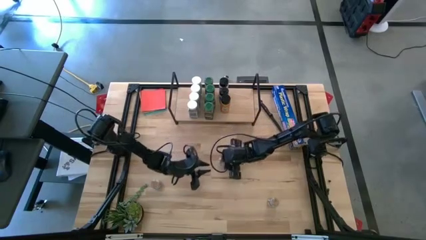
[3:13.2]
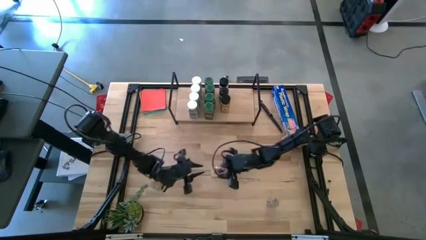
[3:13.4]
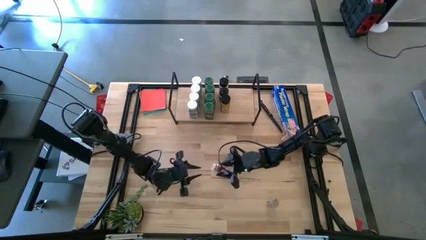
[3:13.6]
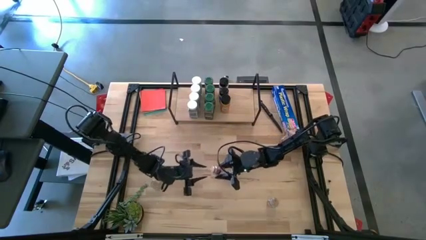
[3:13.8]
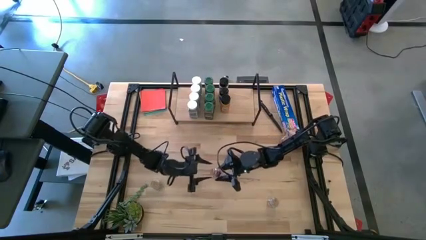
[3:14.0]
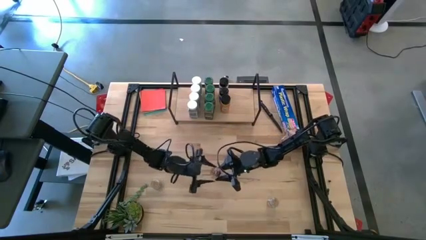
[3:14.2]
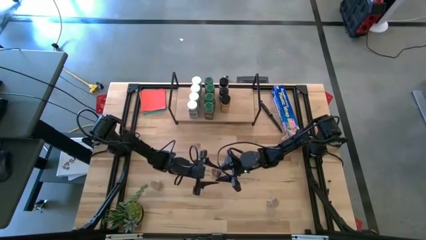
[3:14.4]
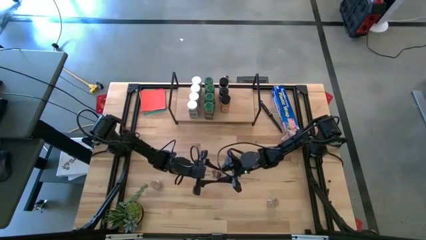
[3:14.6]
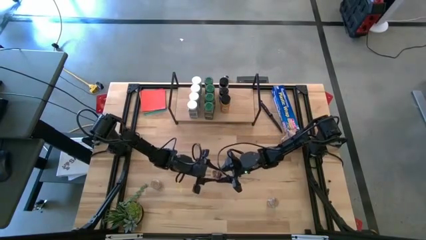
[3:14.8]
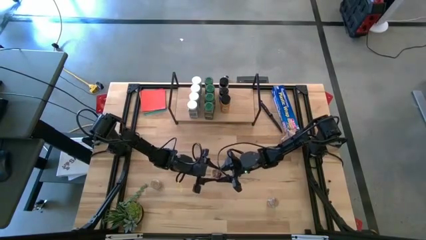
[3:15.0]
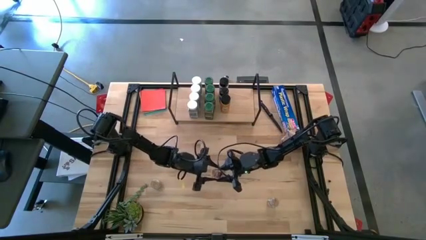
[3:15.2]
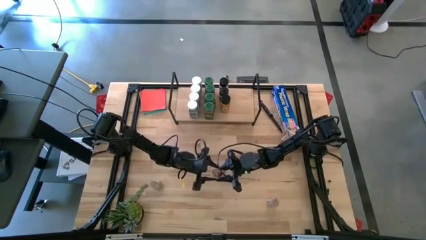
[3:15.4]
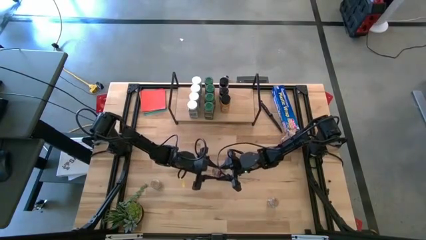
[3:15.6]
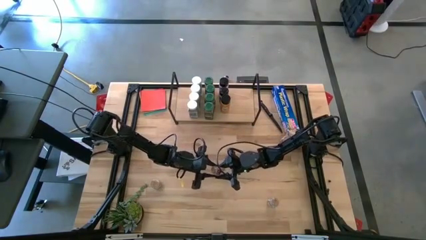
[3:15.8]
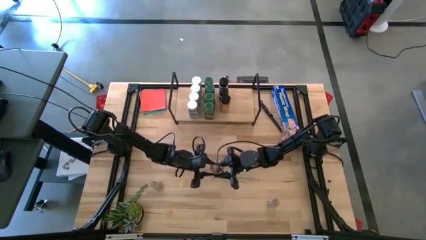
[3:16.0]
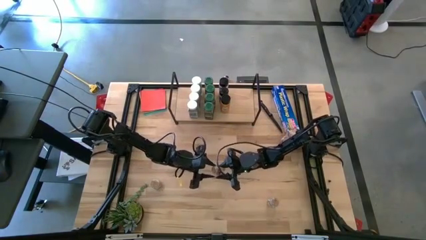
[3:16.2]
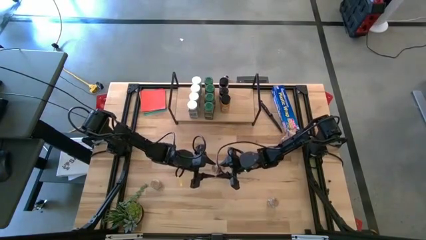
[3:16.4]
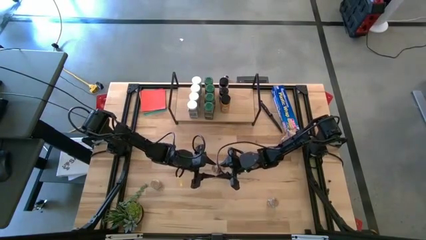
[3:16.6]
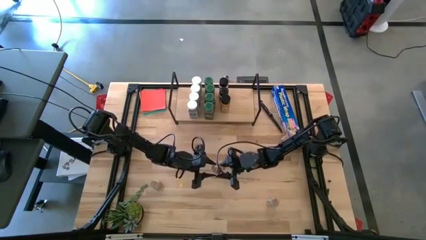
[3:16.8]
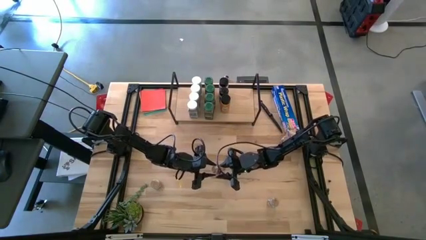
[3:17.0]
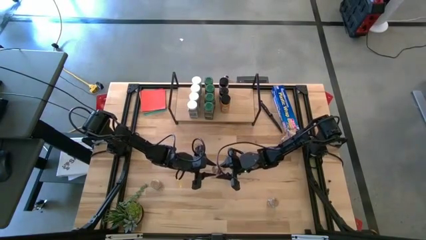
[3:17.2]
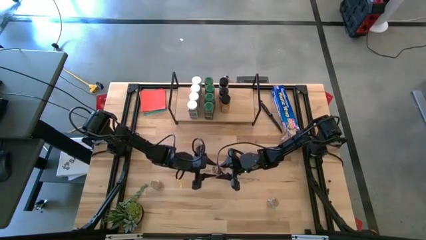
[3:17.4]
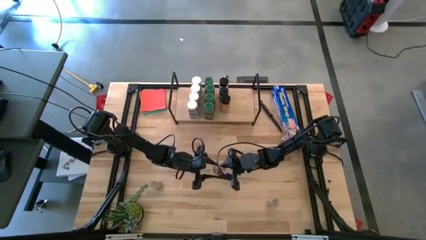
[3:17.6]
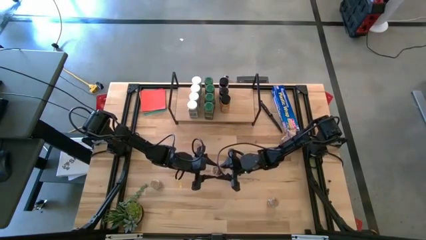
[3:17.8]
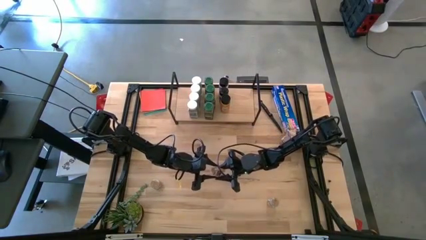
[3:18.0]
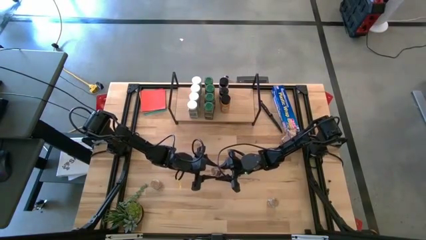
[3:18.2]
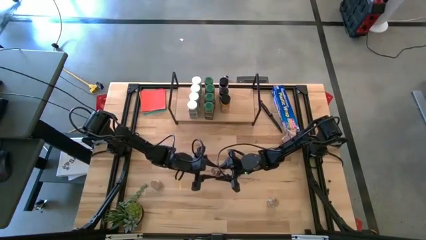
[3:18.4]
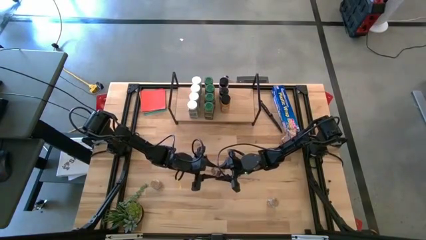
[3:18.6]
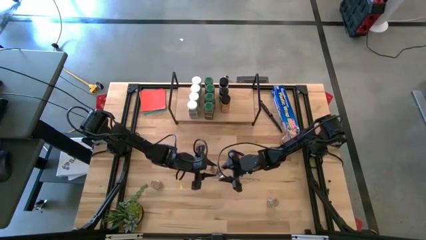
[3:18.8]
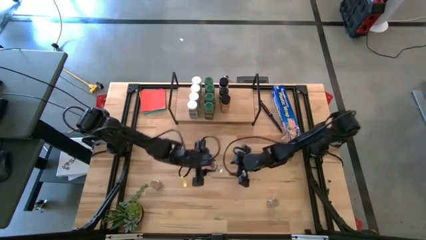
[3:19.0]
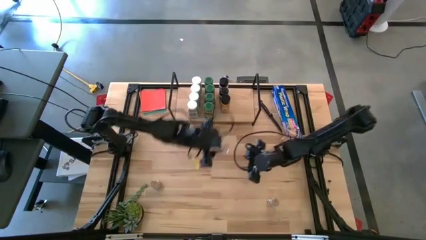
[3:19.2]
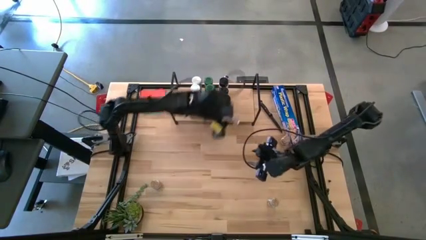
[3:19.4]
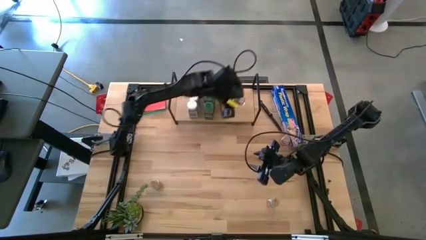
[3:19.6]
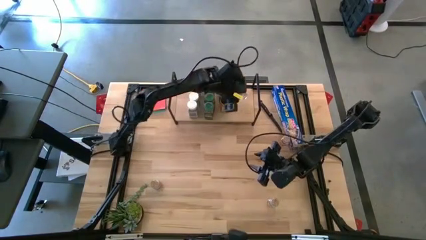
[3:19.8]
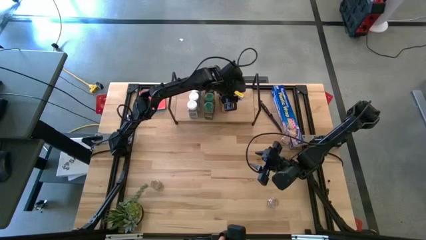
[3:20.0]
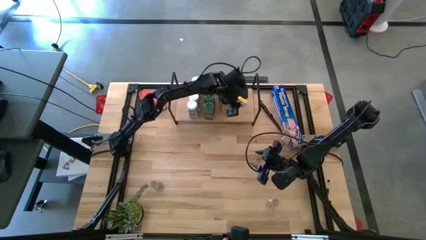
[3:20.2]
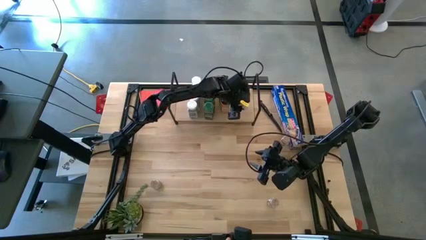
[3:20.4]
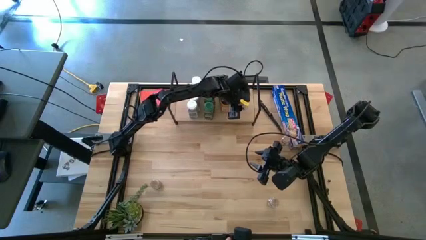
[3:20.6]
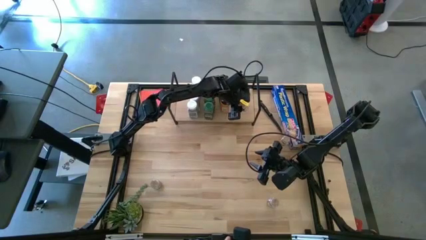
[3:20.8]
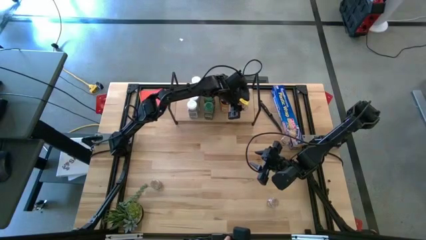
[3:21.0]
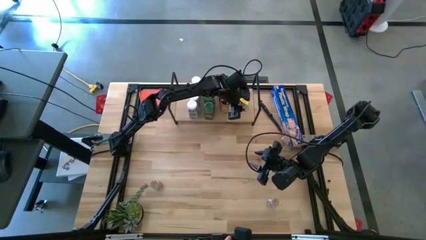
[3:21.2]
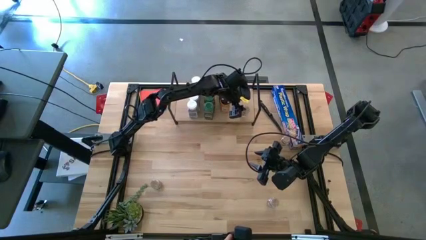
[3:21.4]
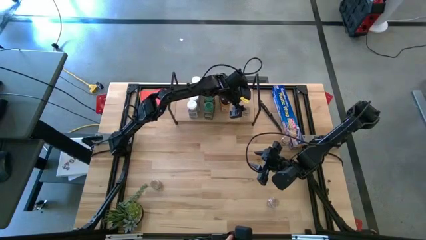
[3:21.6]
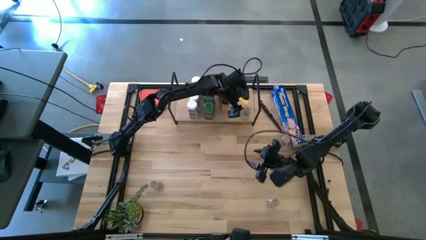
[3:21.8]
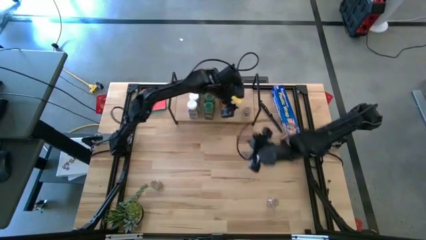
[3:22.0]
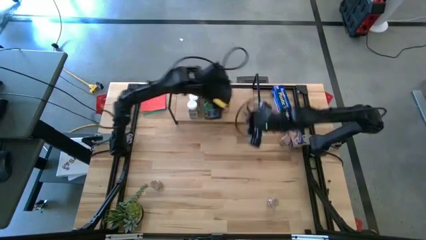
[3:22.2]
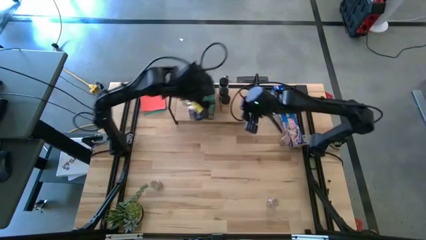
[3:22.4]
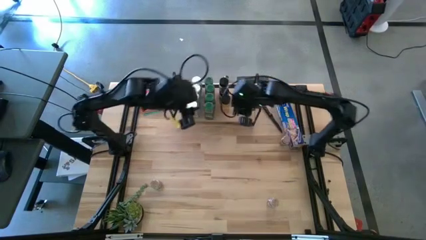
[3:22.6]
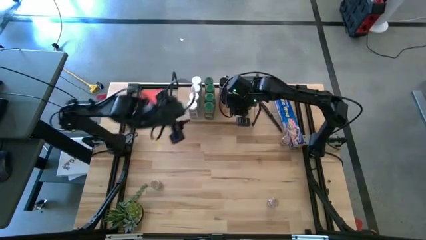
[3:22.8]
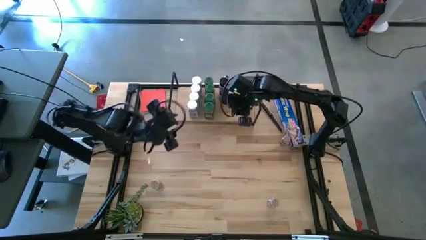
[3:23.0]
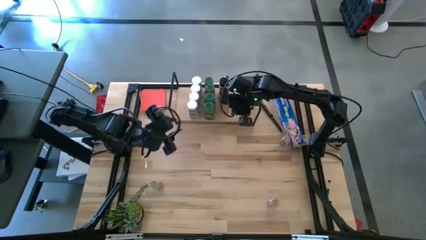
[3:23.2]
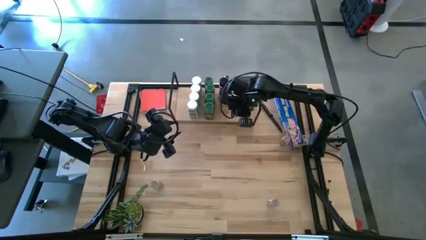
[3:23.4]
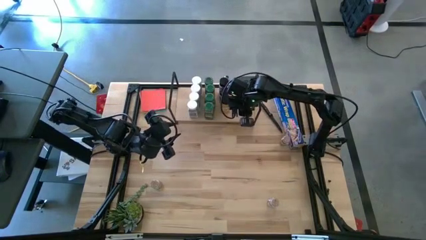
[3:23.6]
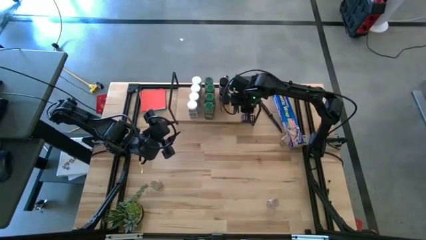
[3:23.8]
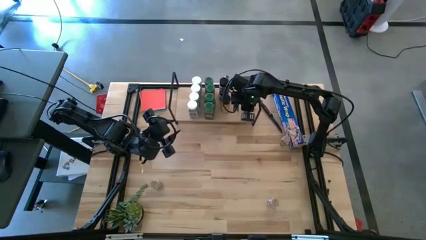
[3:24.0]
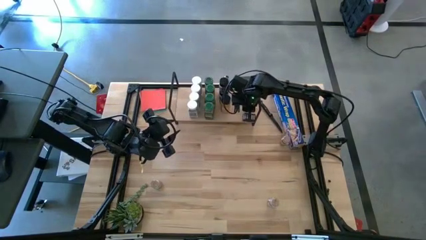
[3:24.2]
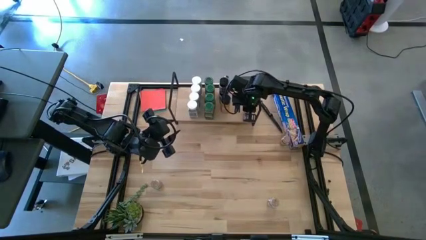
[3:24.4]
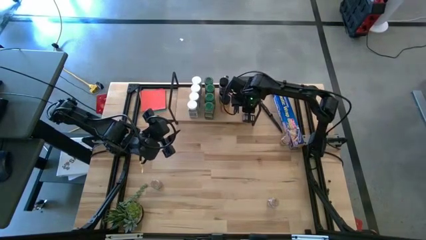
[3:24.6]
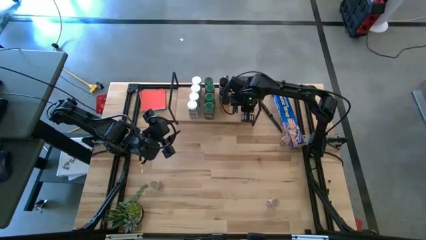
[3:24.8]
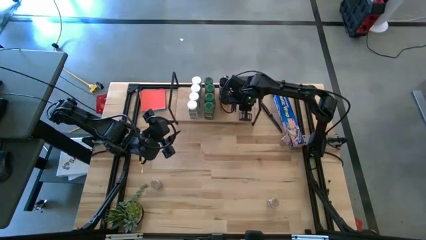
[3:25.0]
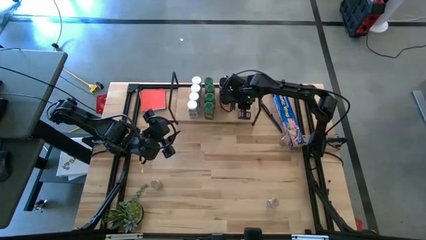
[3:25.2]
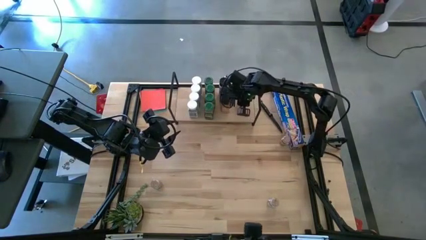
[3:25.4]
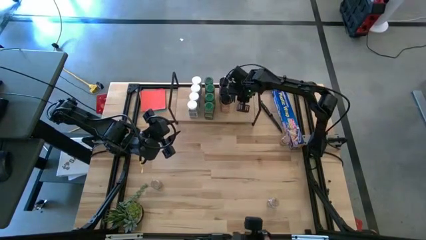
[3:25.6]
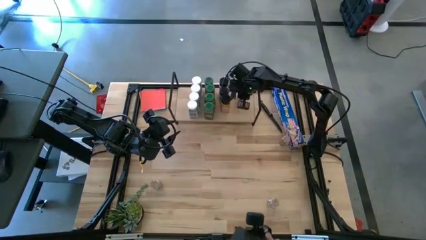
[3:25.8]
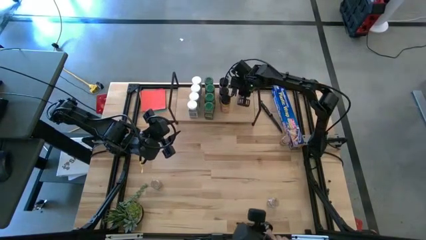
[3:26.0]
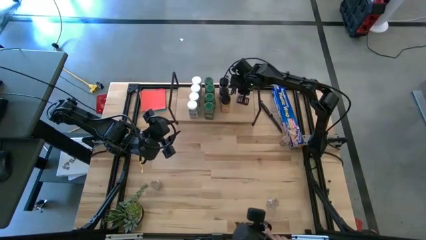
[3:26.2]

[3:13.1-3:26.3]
Task: Shelf spices
Put the top left brown seasoning bottle on the shelf

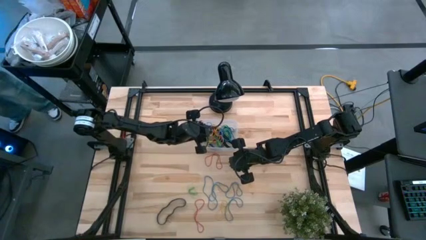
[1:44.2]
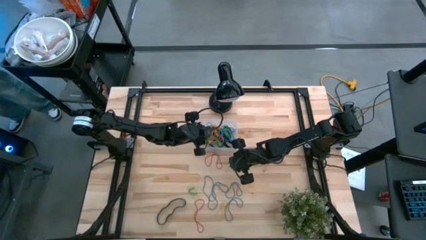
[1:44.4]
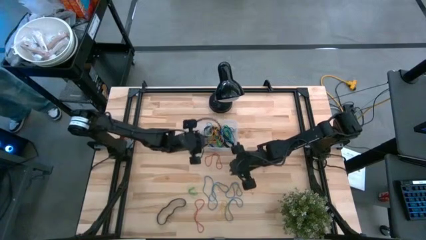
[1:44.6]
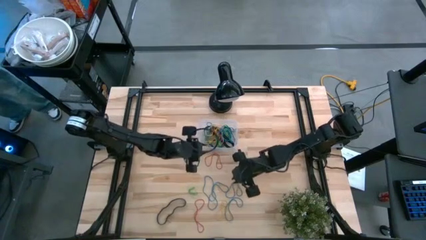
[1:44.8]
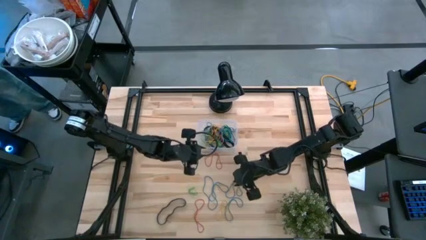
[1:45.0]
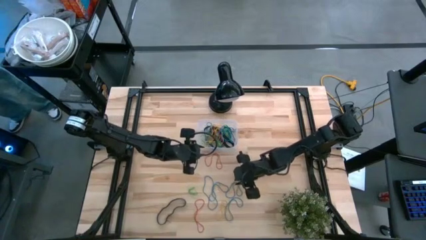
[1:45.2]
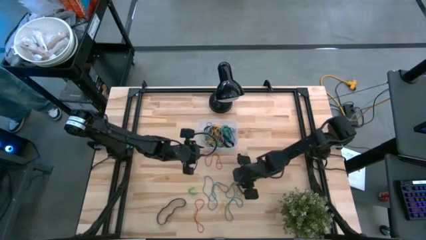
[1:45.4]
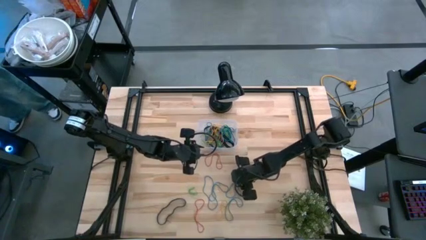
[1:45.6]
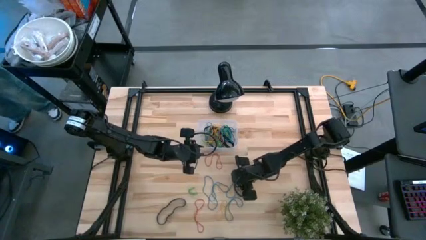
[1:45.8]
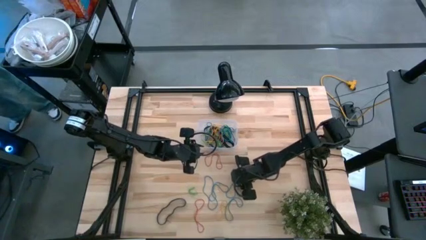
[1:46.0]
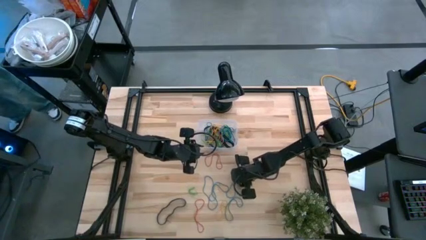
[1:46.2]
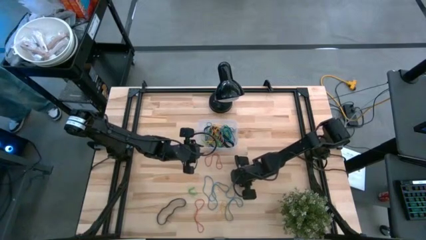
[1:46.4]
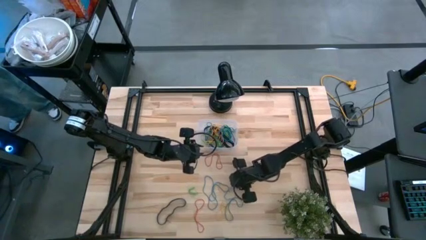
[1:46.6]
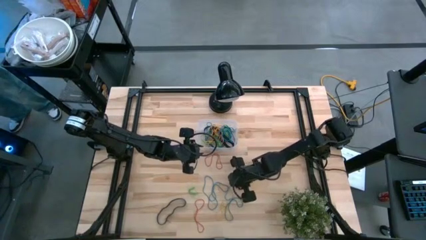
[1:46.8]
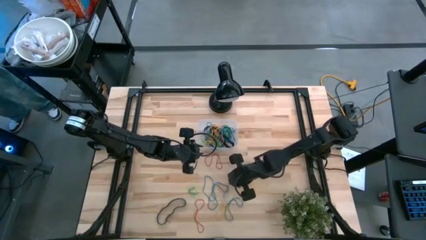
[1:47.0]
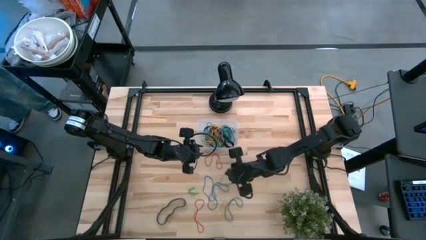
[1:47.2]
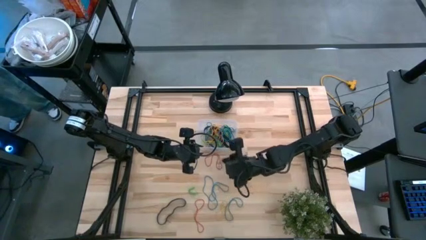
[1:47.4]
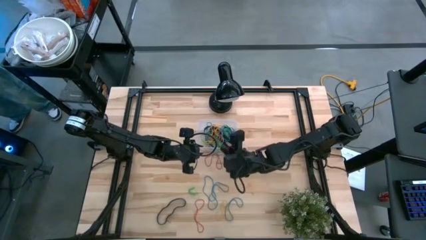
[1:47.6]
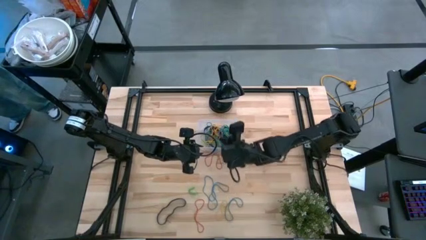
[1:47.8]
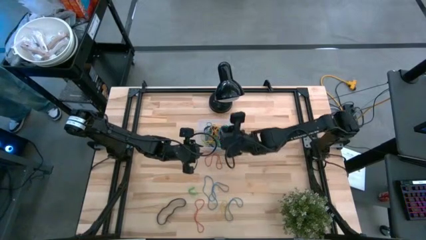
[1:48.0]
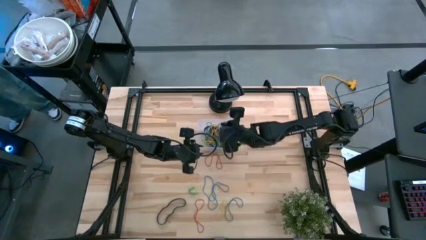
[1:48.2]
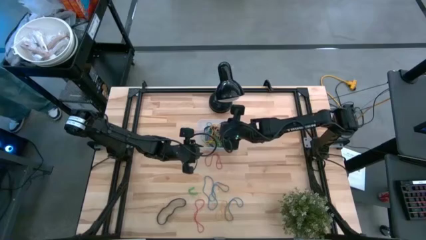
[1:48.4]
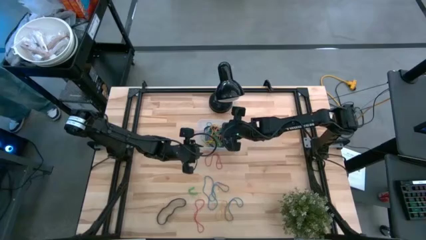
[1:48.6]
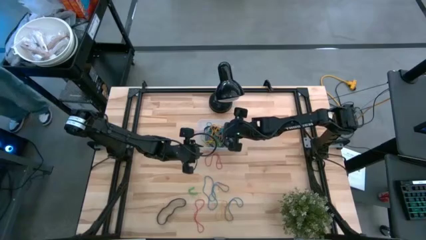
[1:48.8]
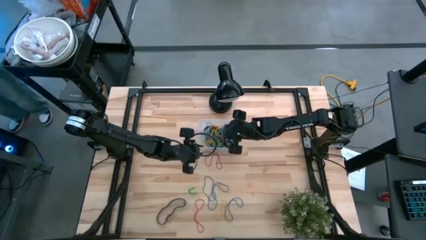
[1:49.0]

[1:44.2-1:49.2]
Task: Pick and place rubber bands into bin
Put the blue rubber band into the transparent bin
